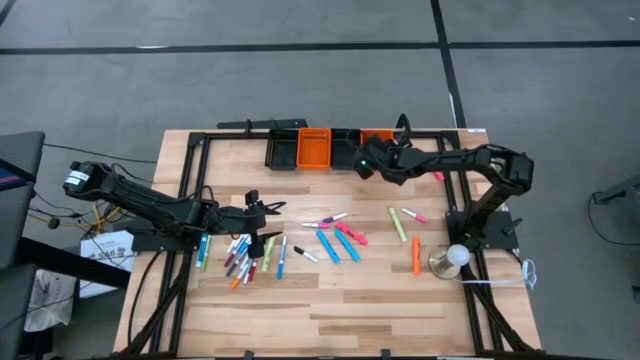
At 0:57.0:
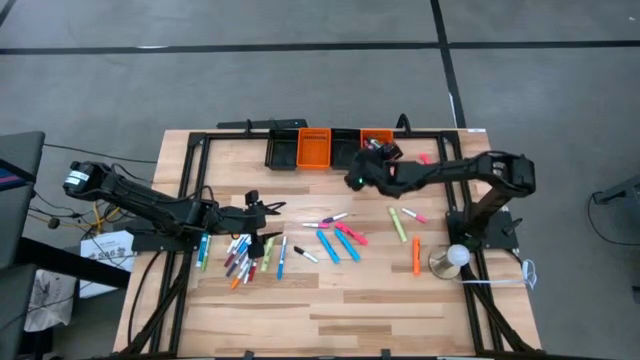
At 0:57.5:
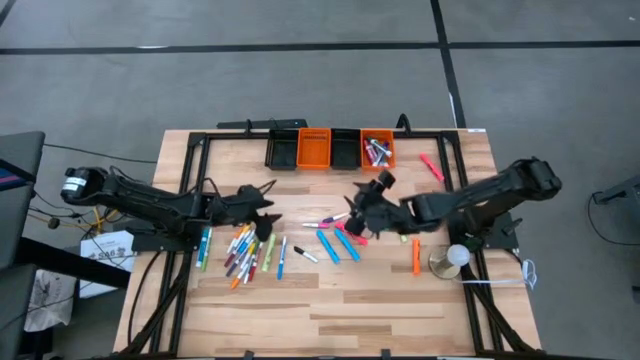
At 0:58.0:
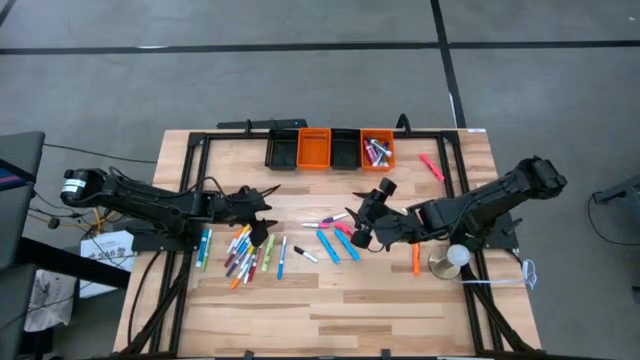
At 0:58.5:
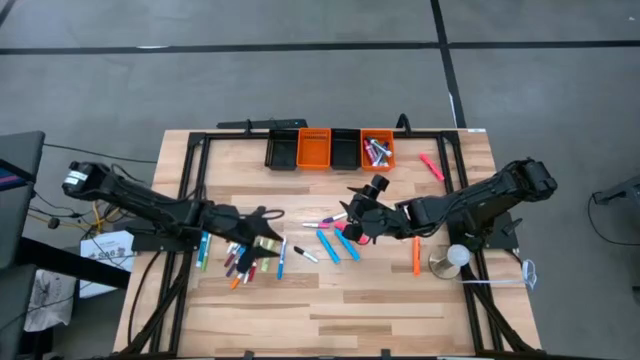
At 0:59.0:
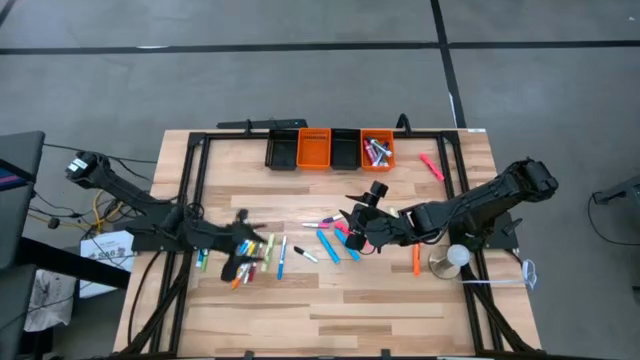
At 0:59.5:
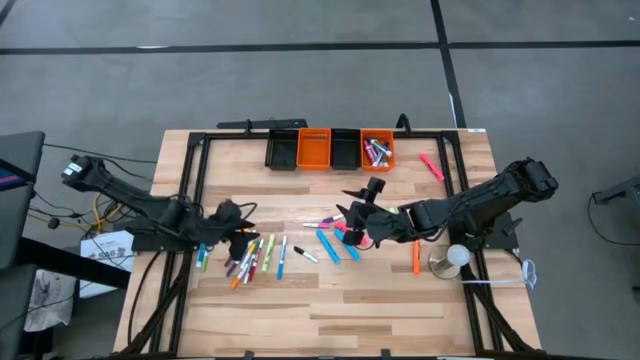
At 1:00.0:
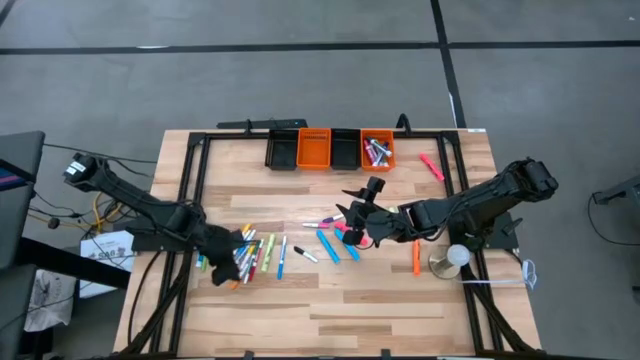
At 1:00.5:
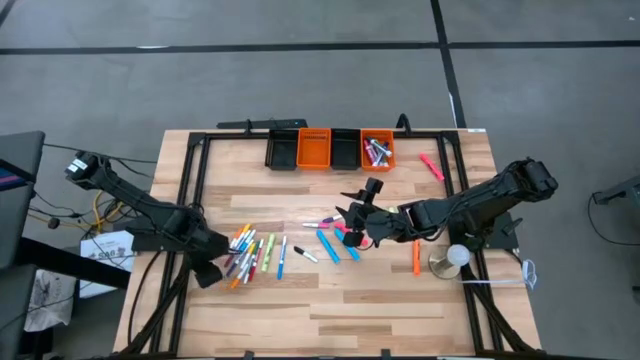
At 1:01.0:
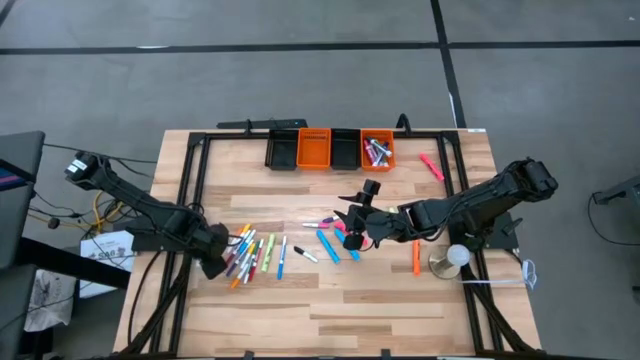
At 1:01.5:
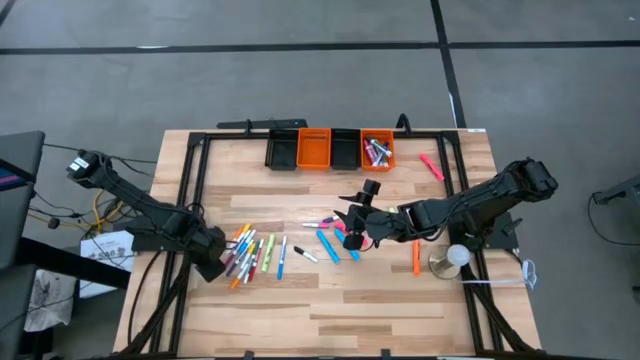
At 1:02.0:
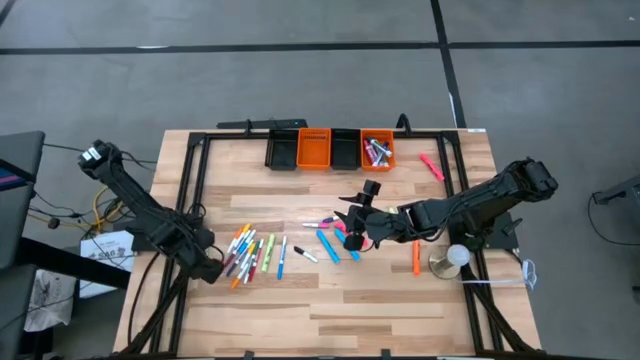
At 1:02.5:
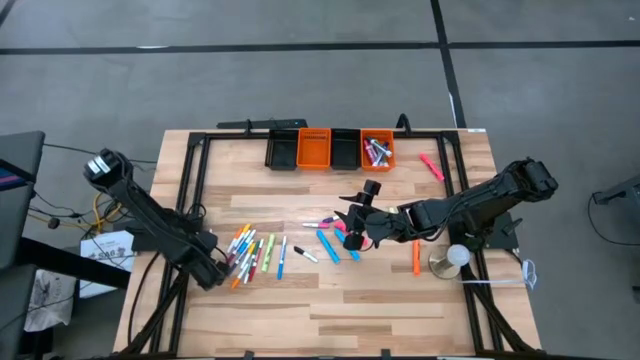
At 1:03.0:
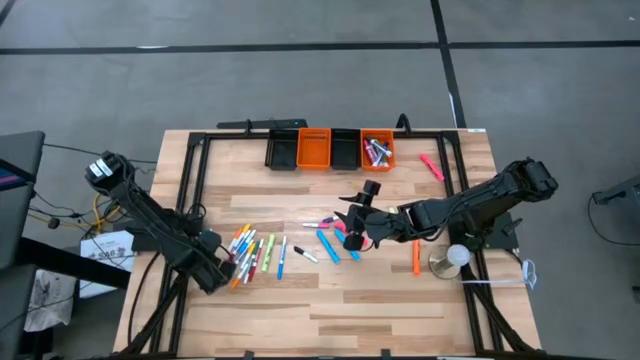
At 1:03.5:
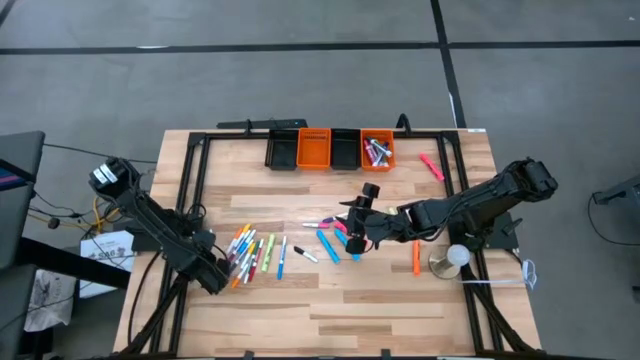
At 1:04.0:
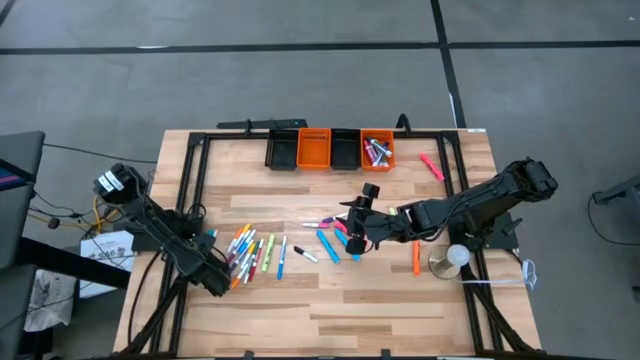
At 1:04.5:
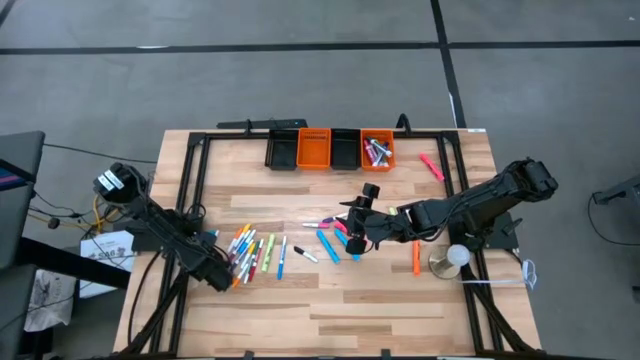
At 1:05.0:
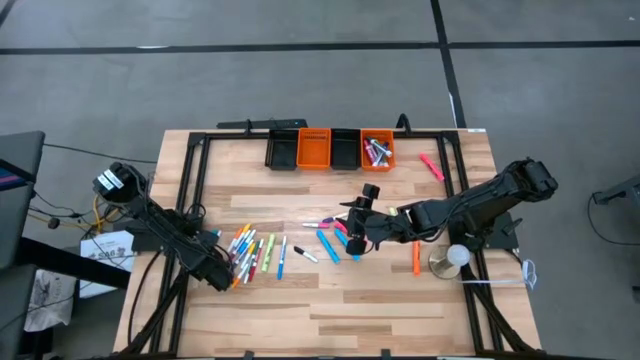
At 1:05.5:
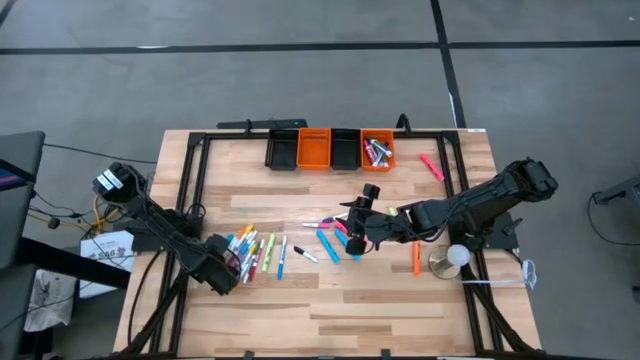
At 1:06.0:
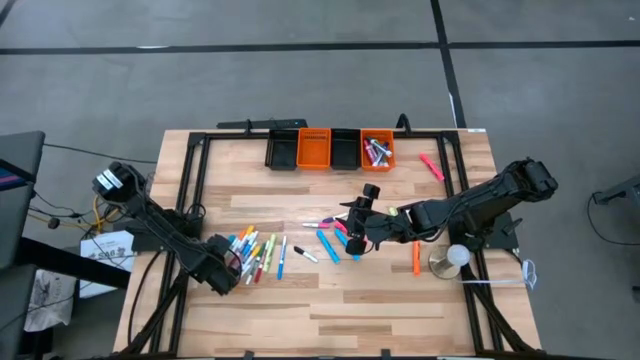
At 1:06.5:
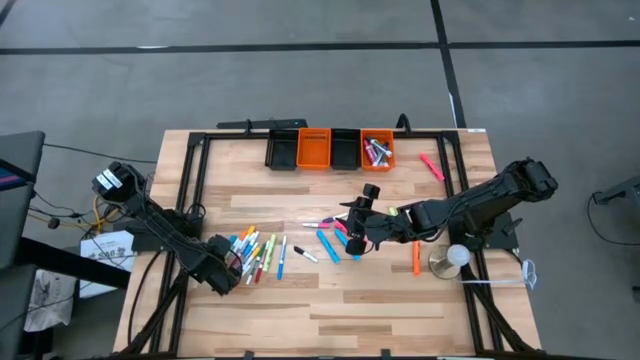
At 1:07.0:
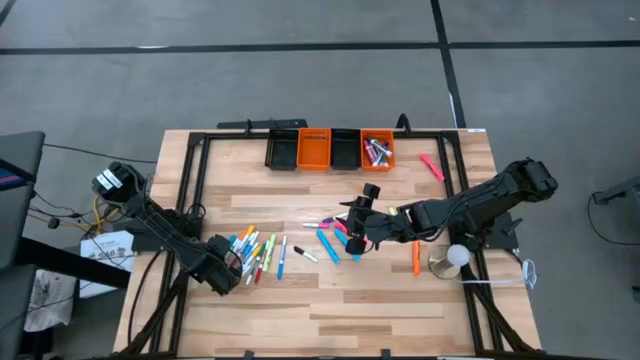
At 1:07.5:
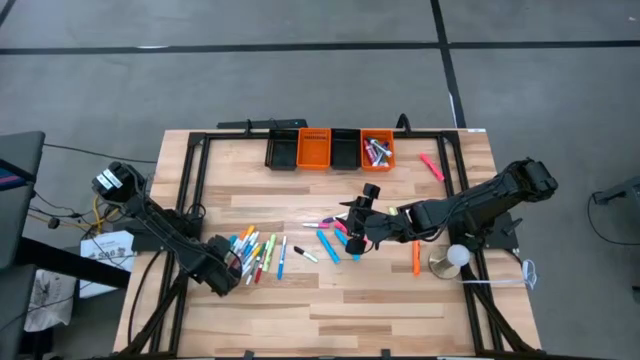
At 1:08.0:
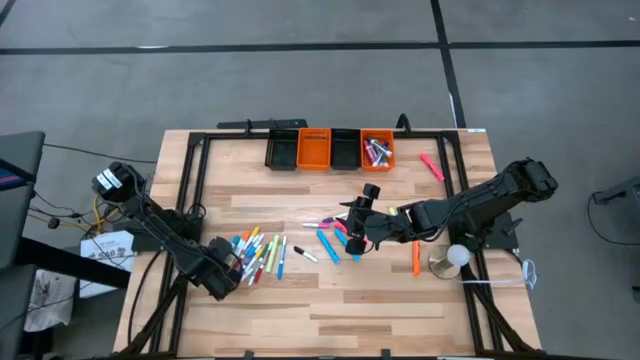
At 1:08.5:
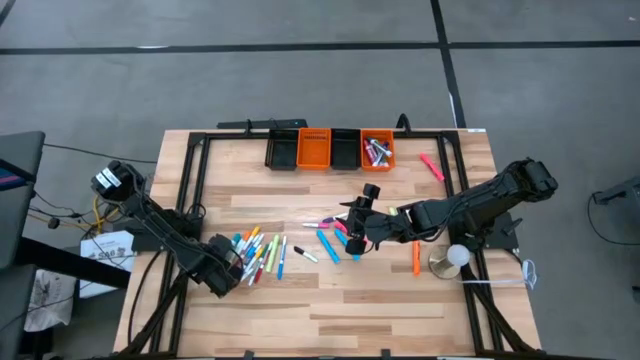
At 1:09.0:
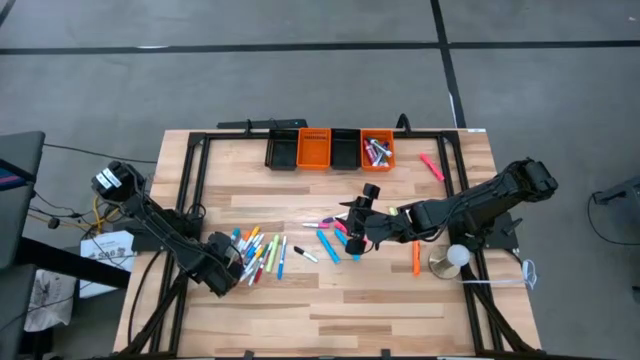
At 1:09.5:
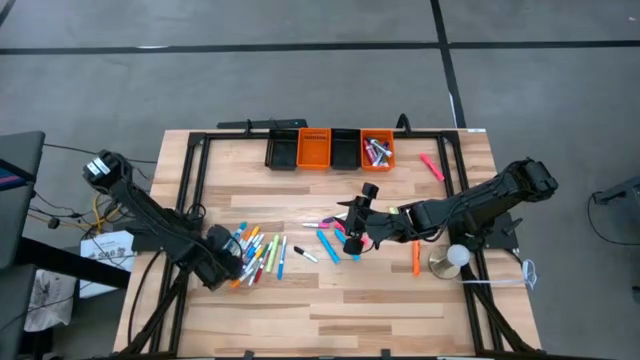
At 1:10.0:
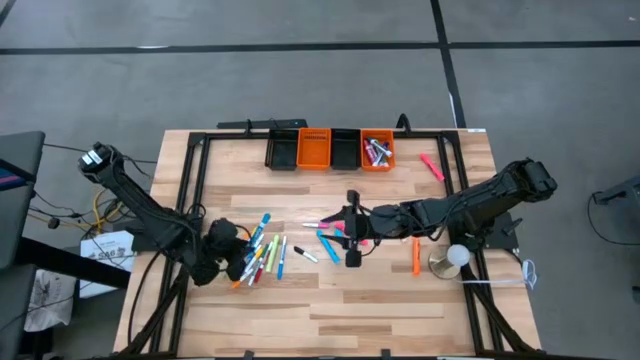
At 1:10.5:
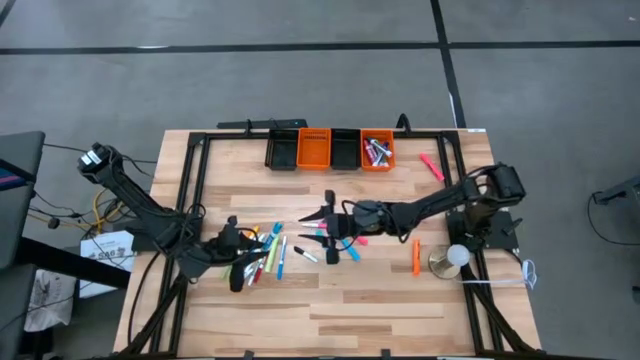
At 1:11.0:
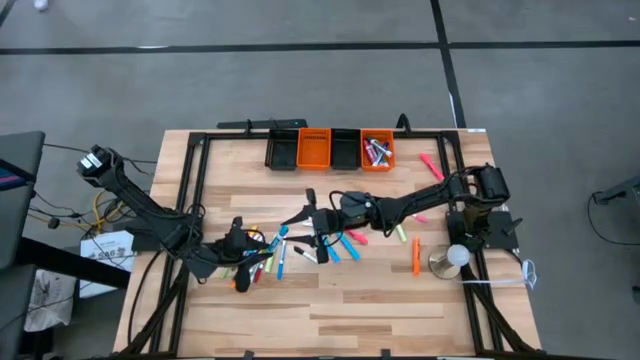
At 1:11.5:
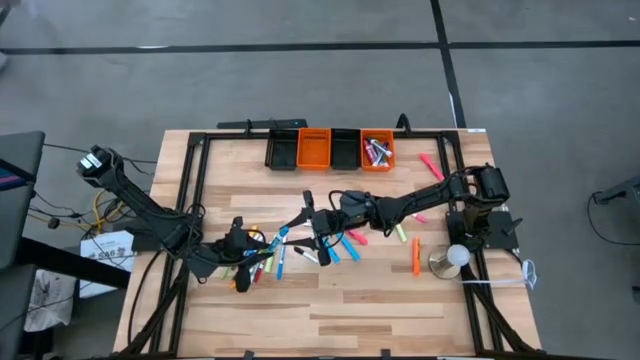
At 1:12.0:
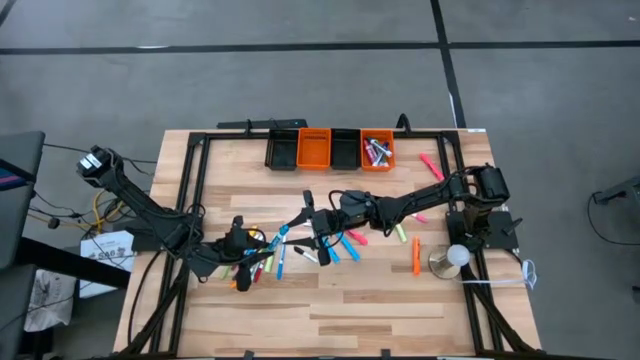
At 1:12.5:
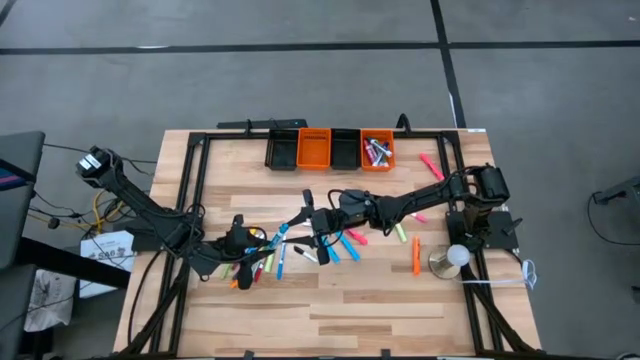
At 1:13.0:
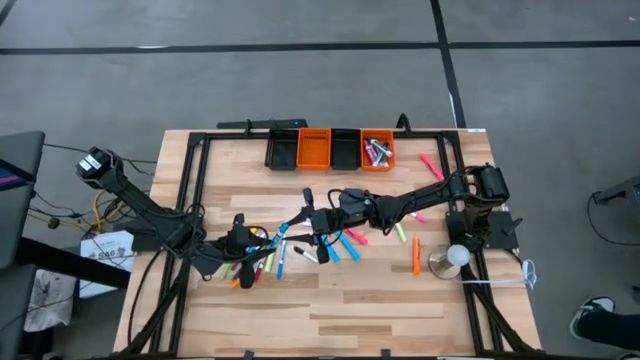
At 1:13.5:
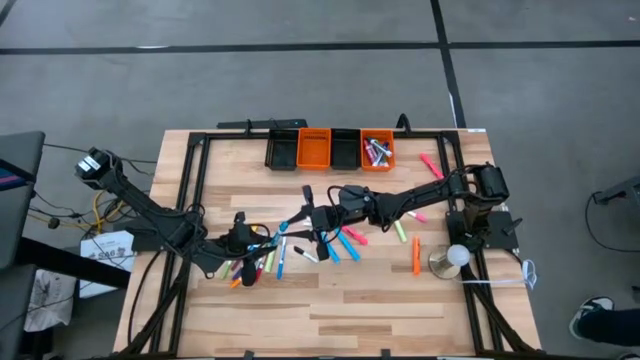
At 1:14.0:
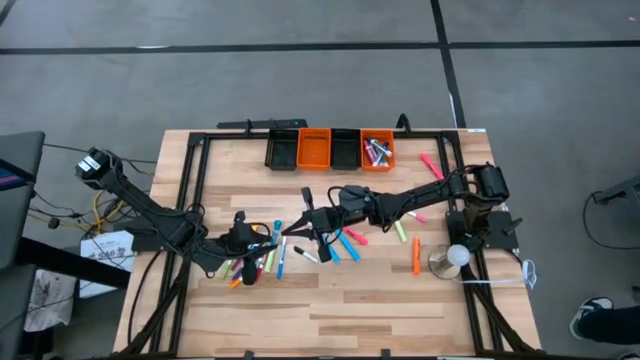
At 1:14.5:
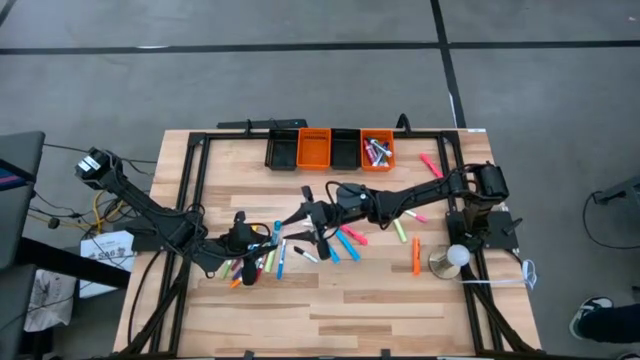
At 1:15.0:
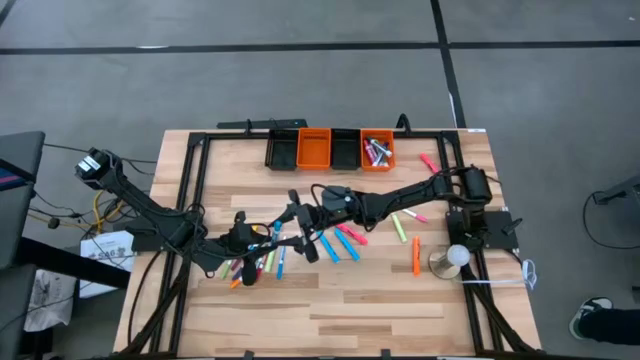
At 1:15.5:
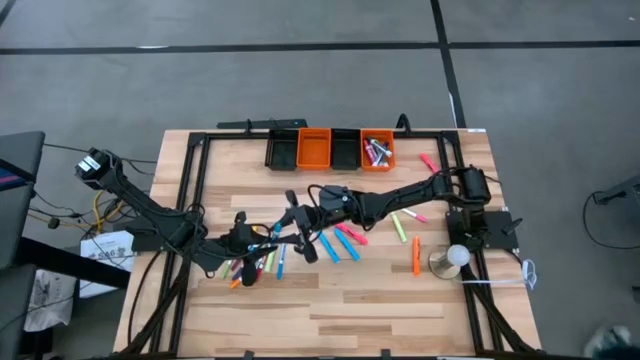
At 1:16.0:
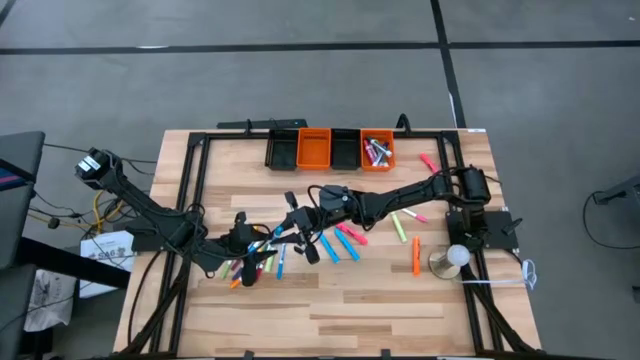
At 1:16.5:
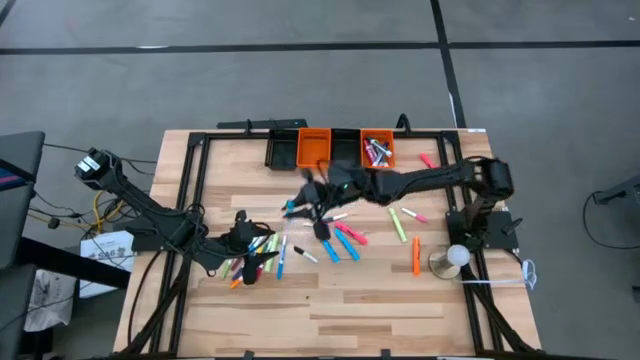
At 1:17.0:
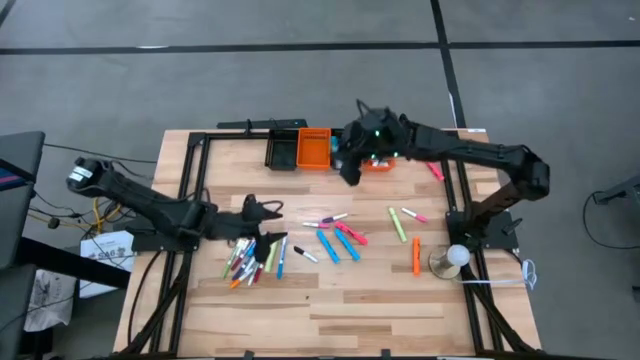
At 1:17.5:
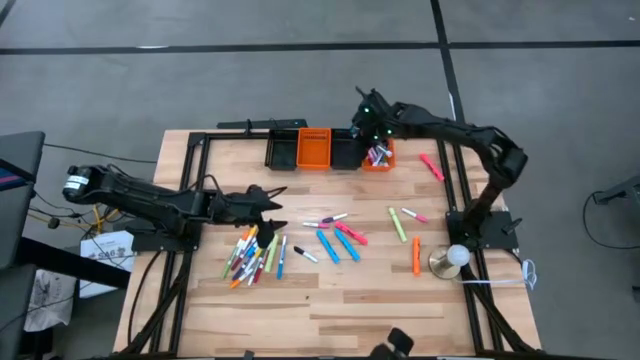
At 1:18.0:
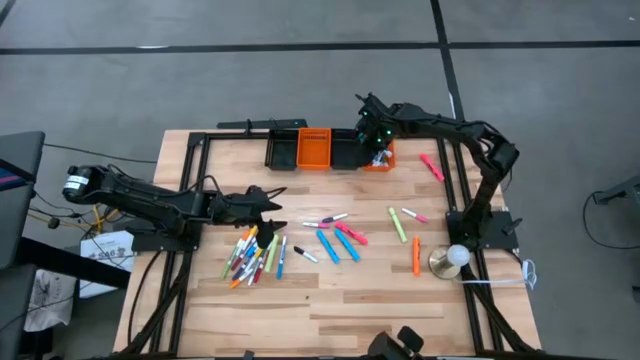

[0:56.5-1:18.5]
Task: Pick & Place Markers
Put the light blue marker pen into the right orange bin

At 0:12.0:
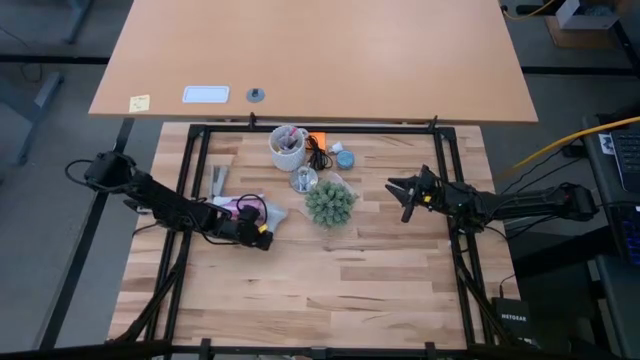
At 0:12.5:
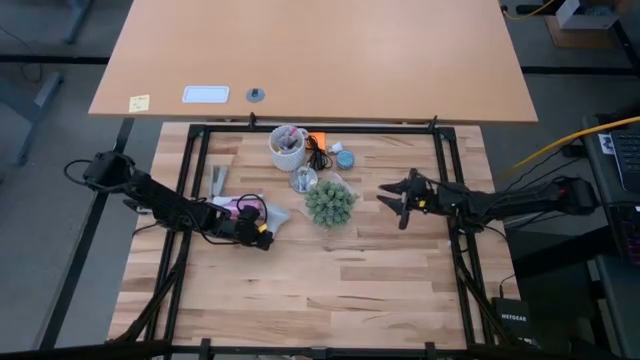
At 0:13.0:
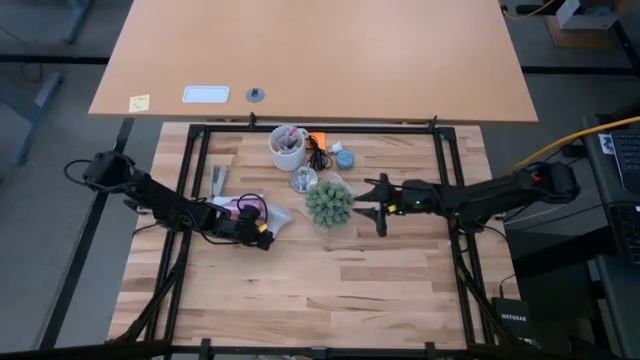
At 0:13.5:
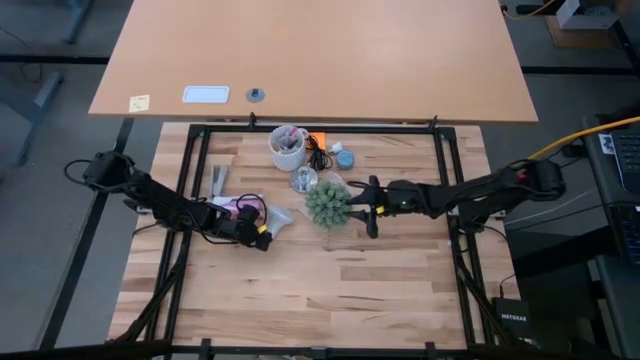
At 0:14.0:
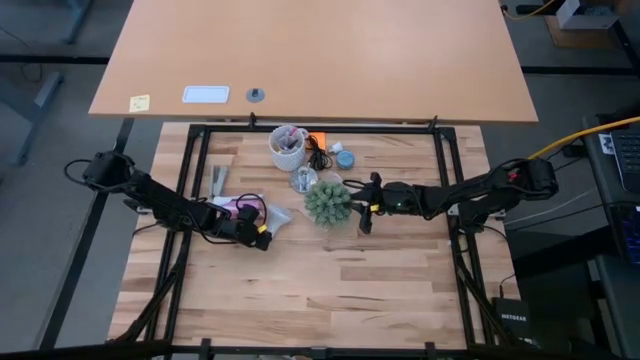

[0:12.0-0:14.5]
Task: Screw lightbulb
Move the gray vase plant to the top right of the table
